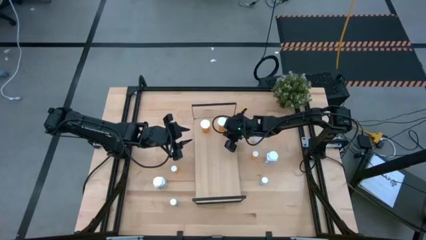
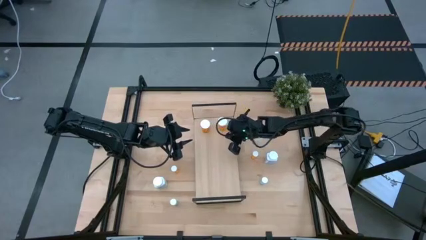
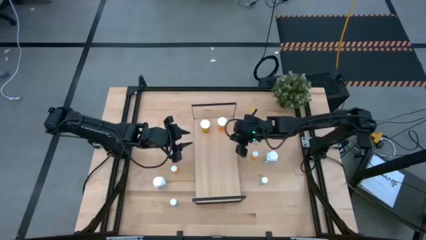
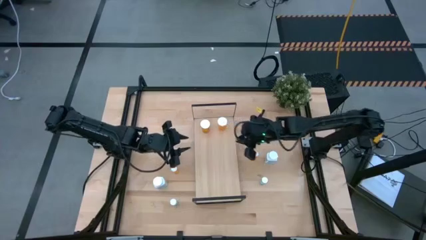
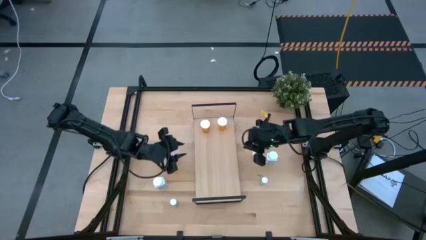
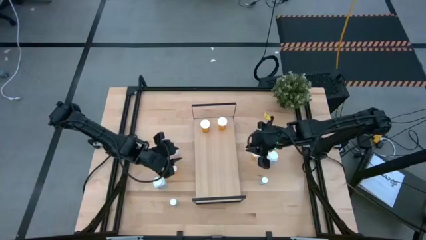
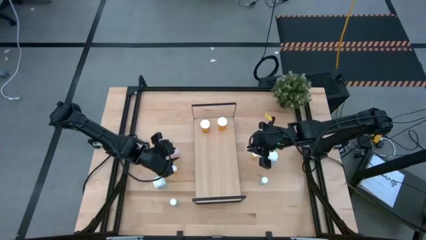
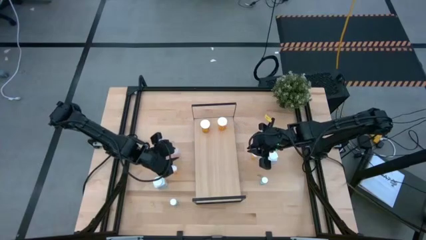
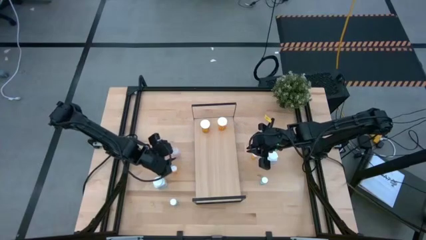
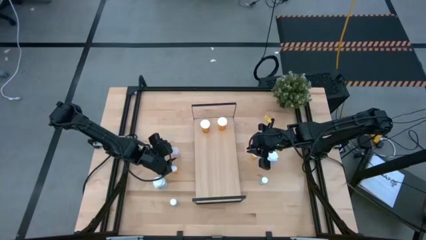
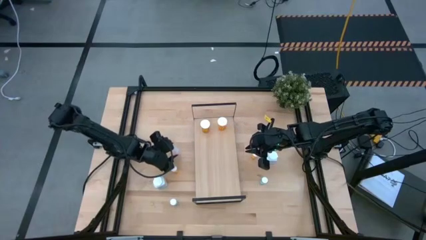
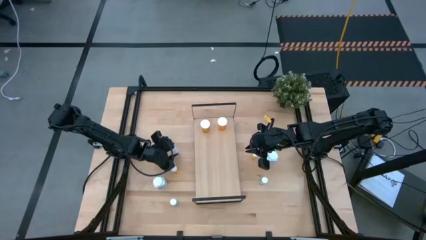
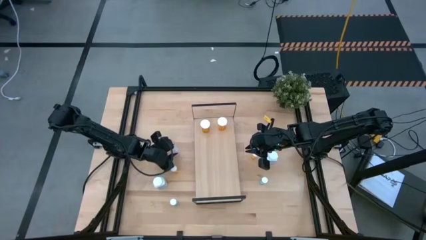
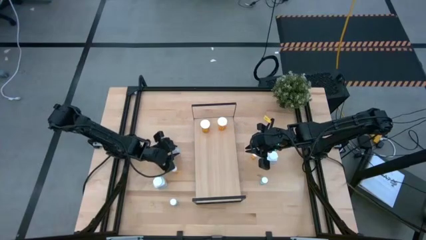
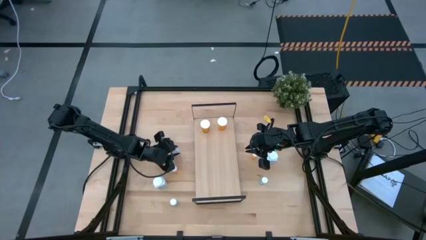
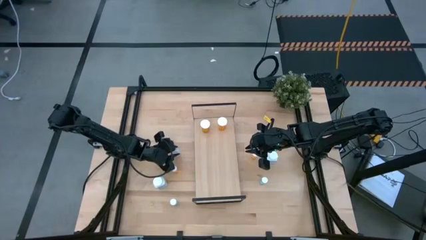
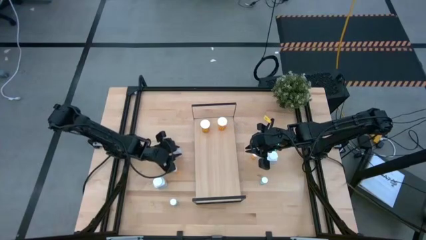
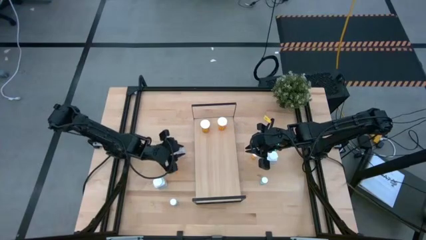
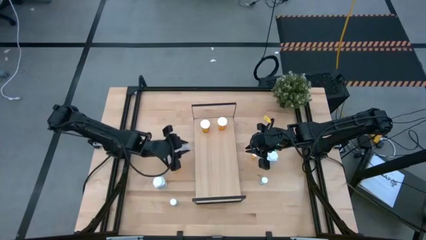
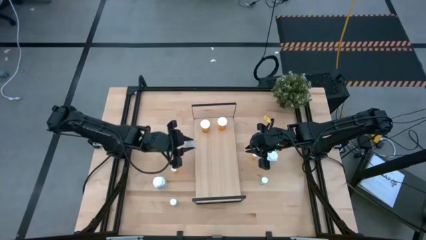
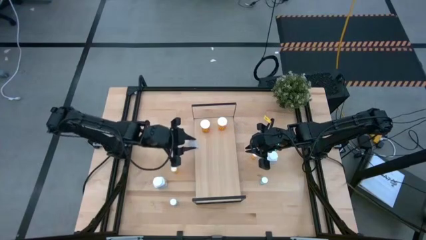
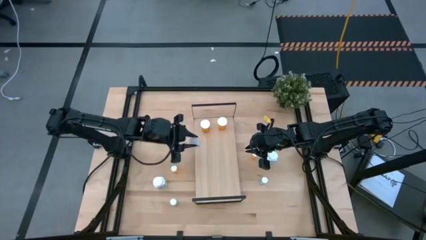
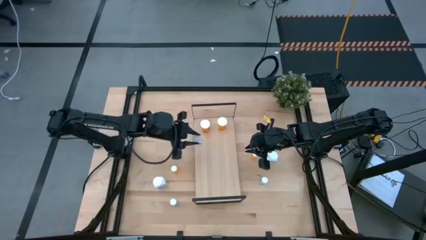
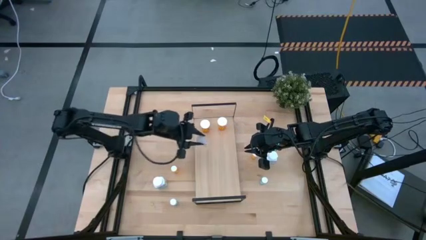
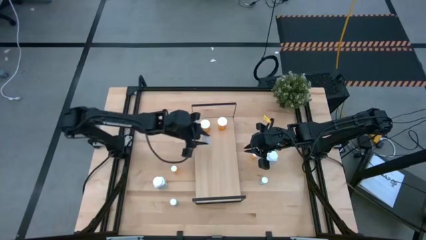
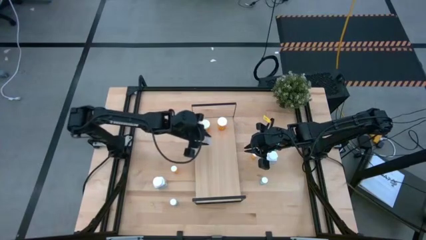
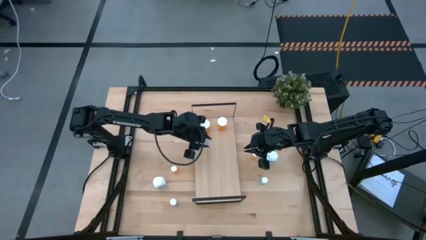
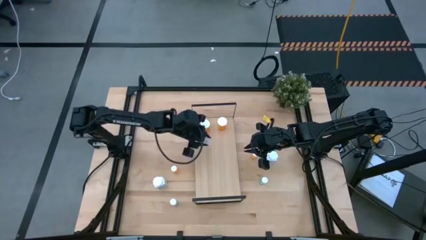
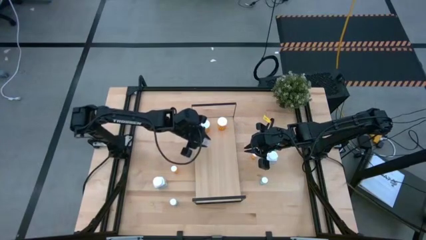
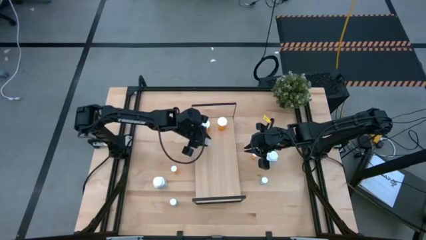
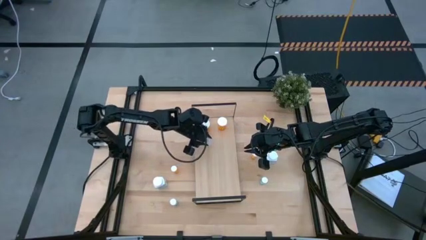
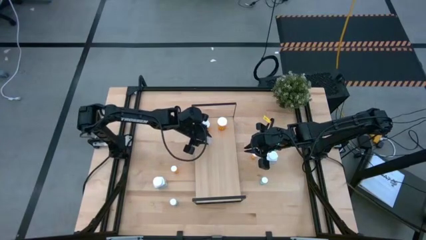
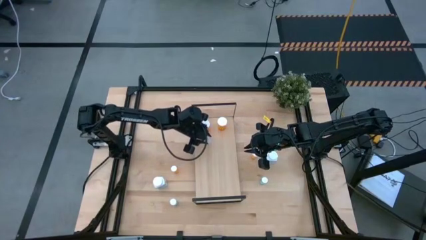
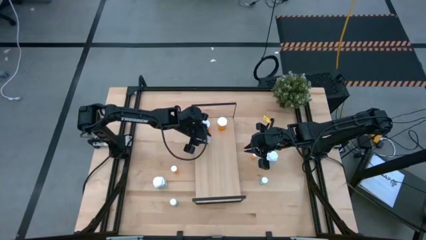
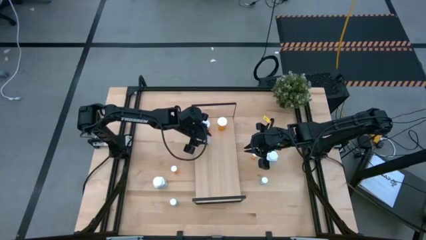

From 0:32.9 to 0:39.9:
Task: Pick and place medicine bottles onto shelf by color
Put the left transparent medicine bottle on the shelf

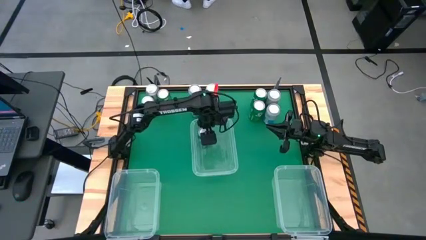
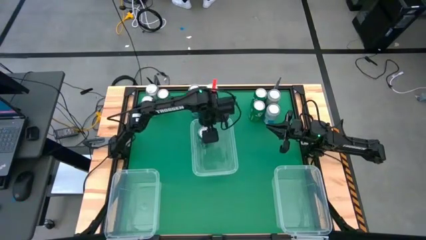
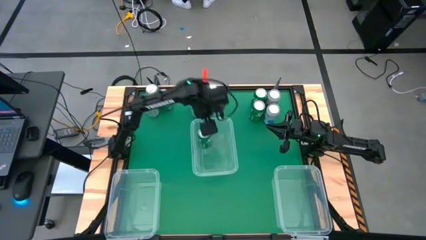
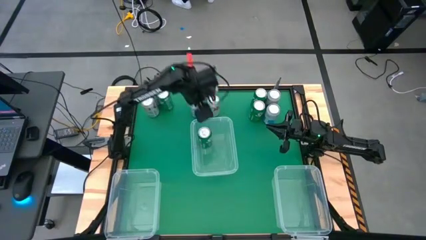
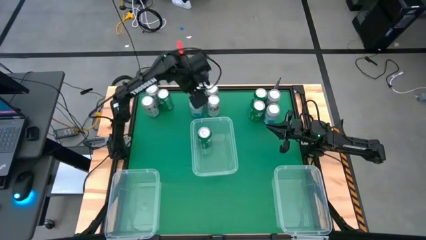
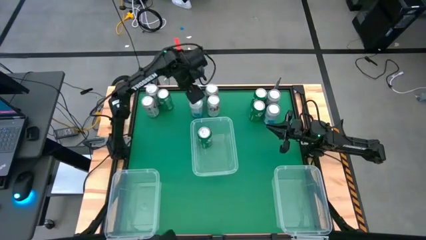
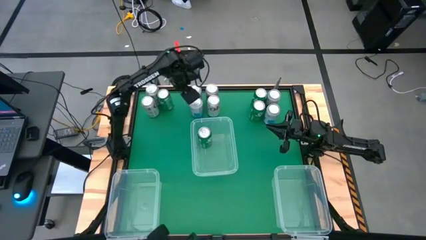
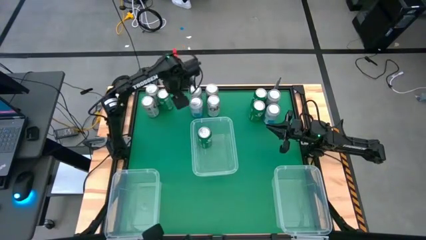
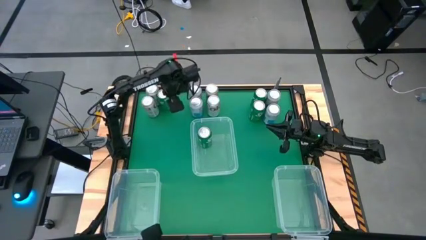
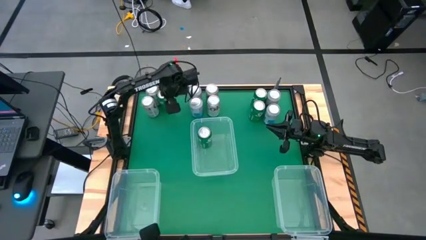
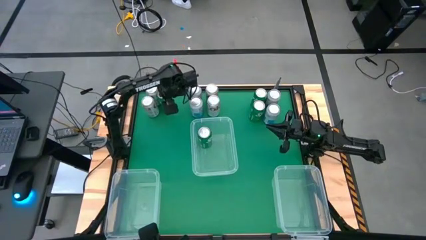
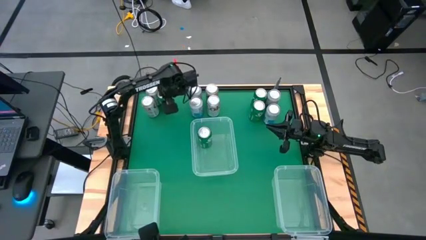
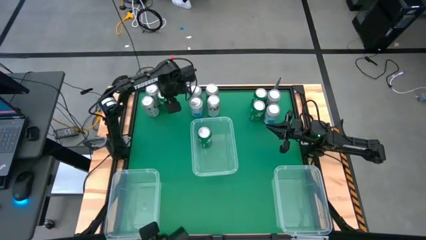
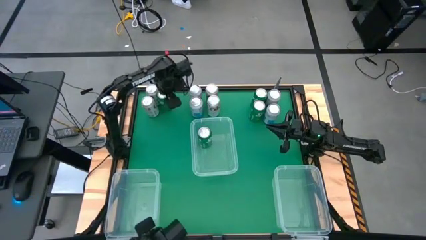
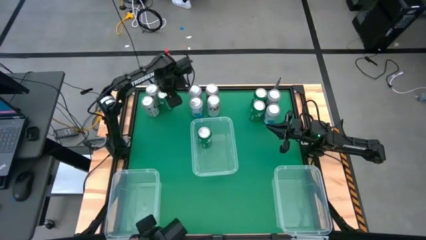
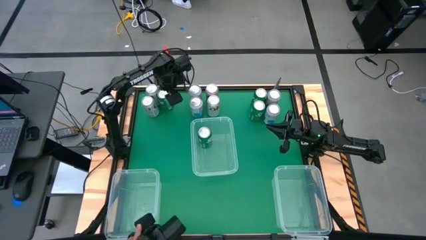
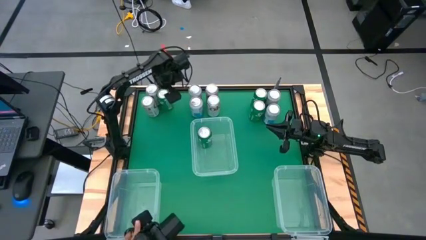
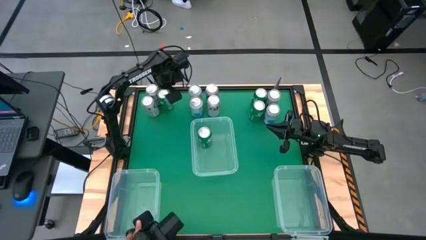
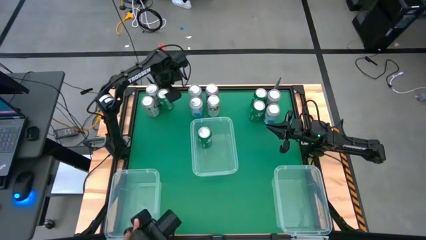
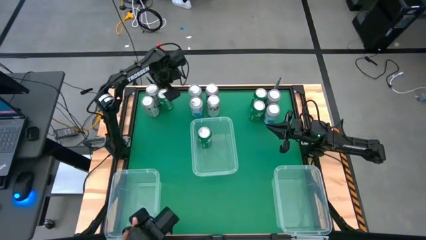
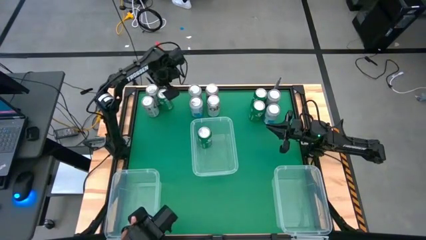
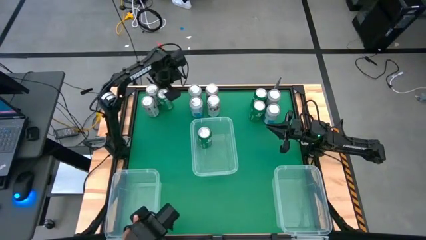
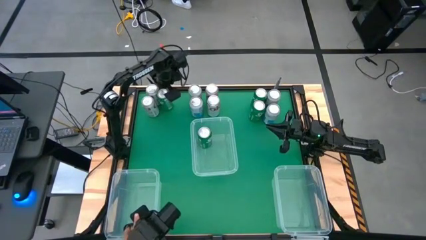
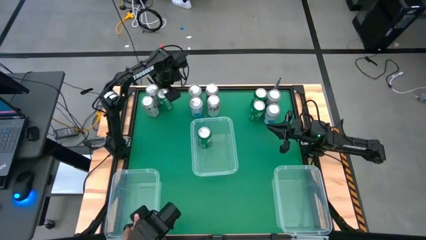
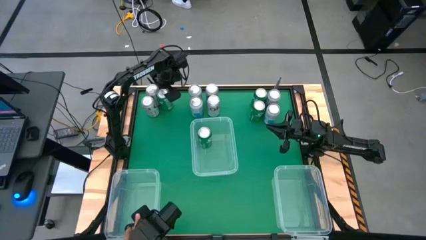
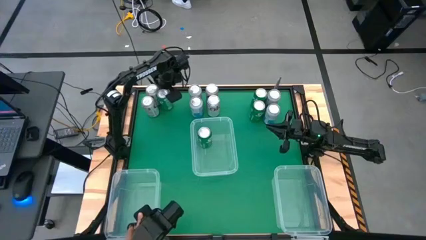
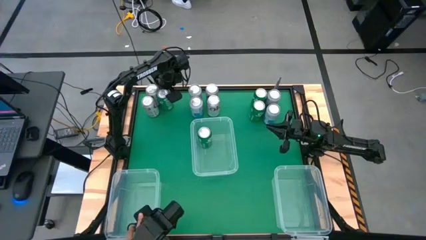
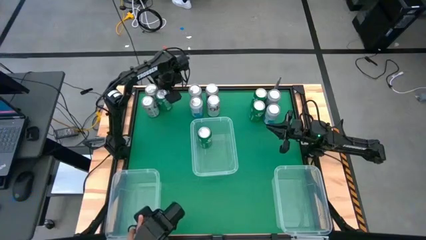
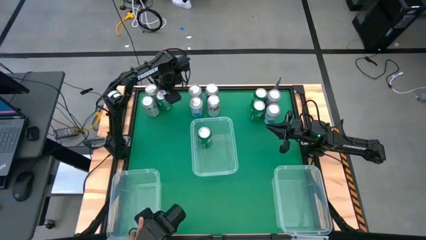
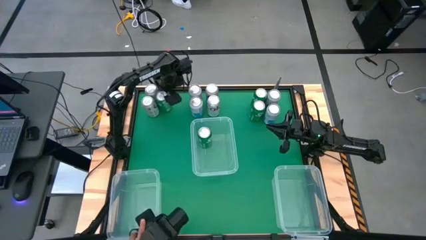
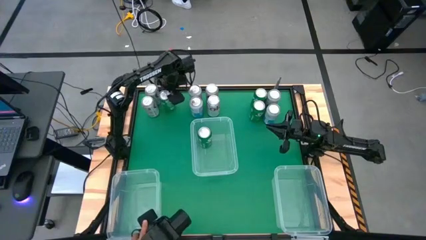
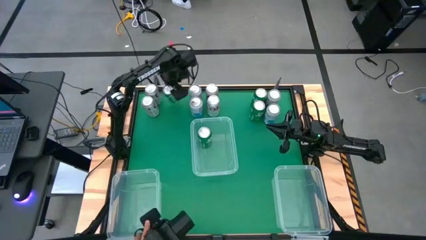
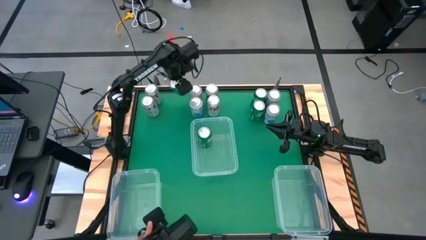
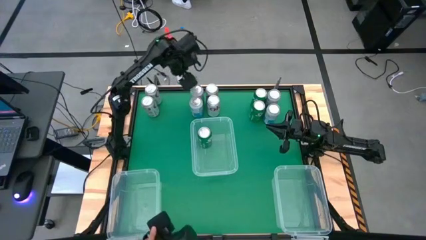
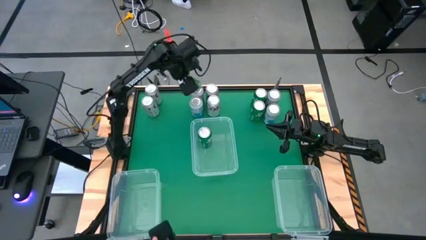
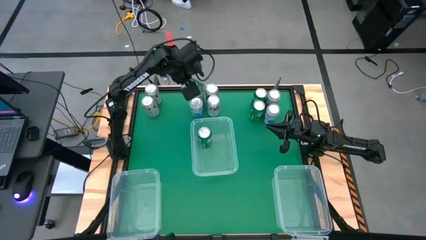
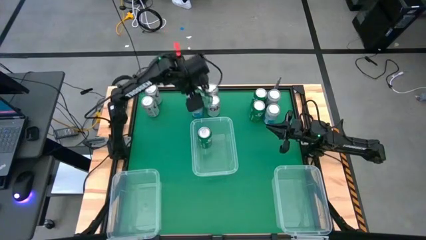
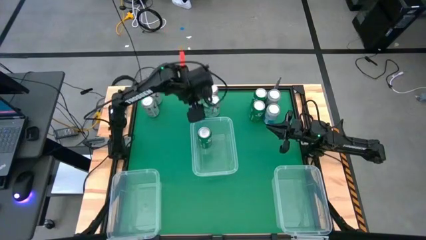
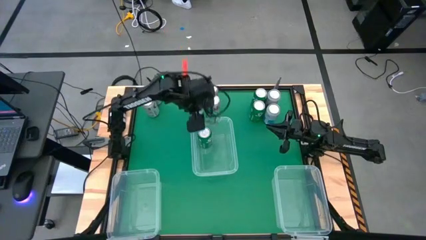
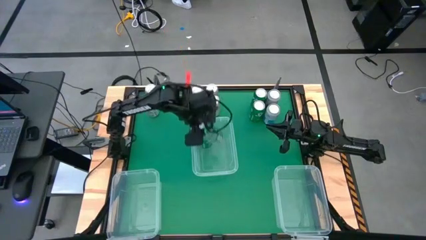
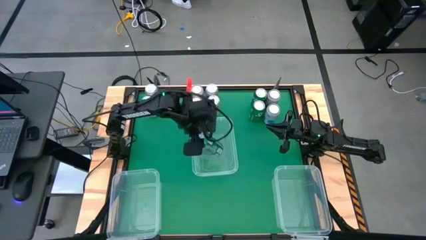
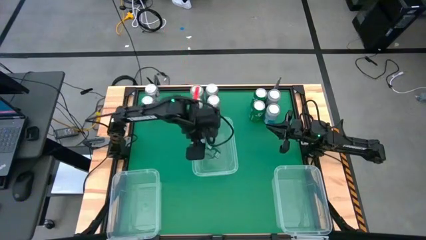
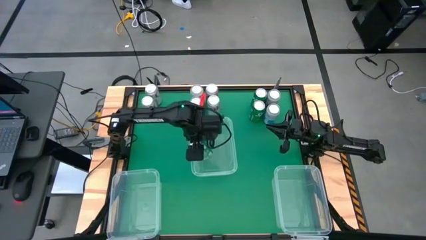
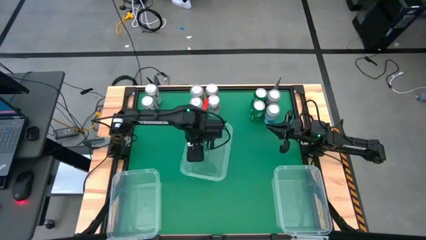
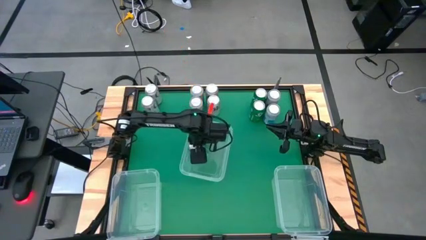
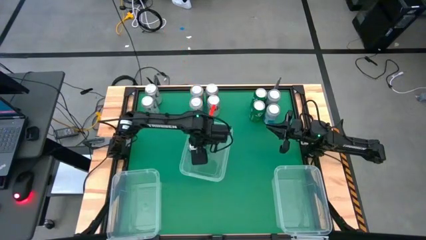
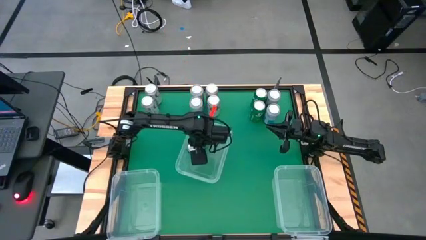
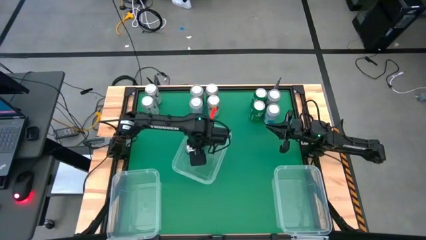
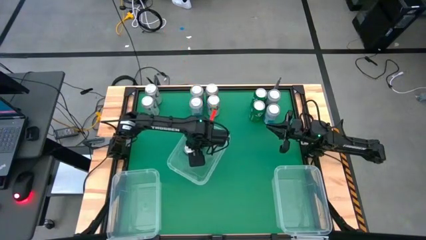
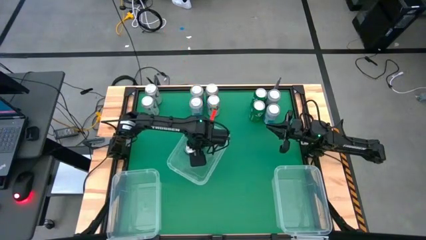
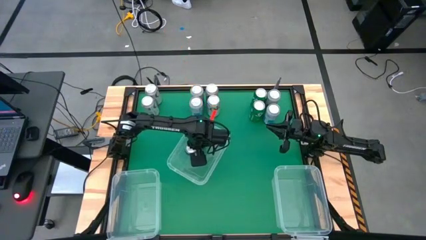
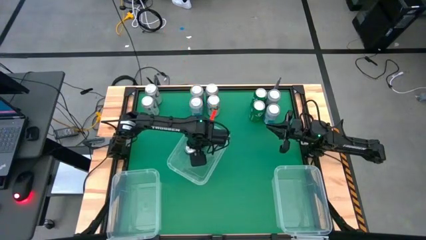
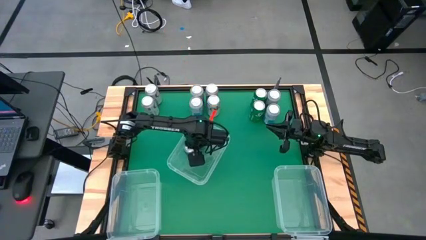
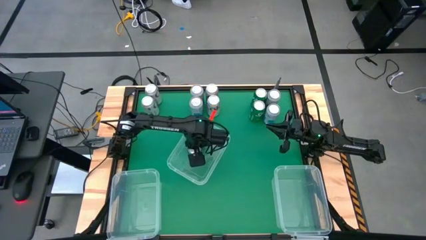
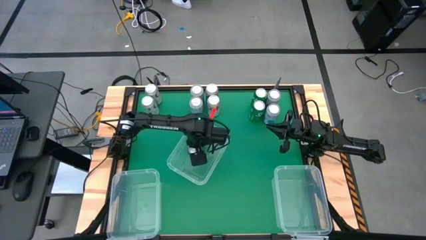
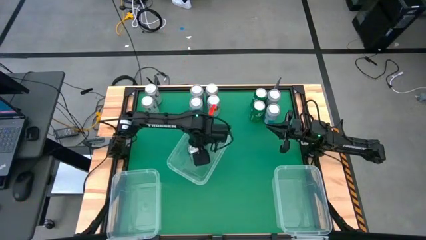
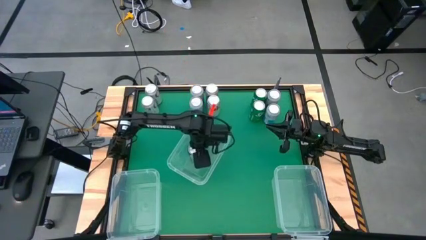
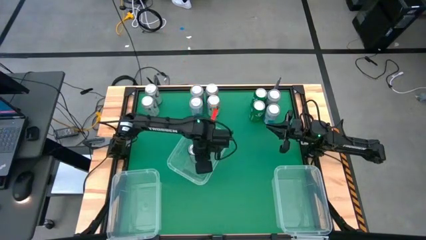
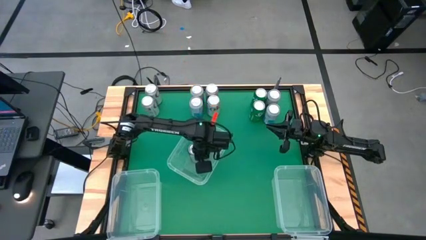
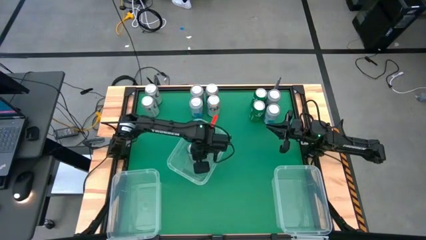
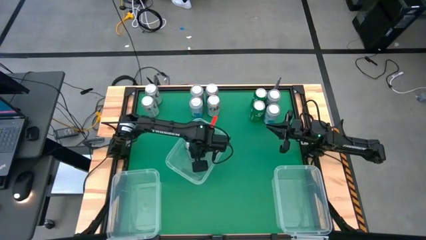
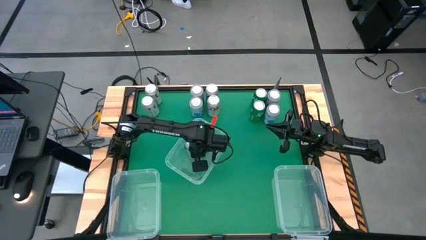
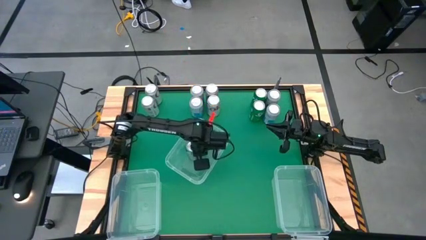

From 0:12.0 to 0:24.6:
Task: Sort soda cans
Put the green soda can into the top bin
